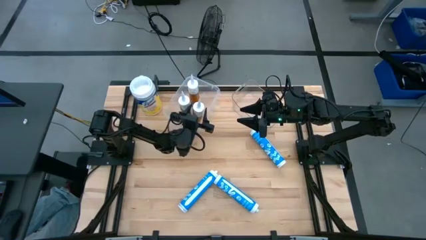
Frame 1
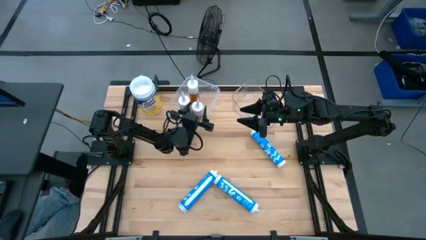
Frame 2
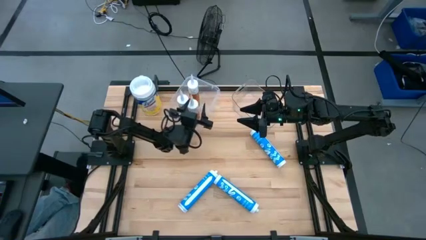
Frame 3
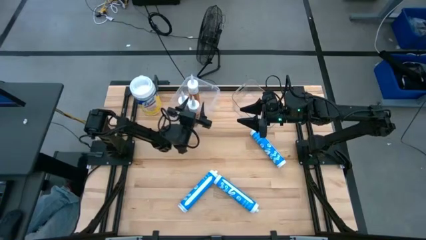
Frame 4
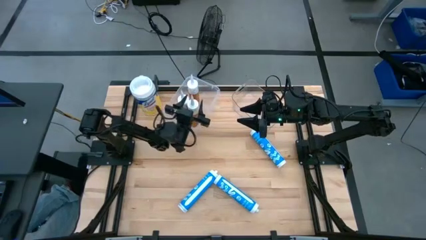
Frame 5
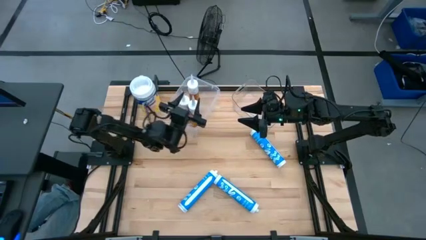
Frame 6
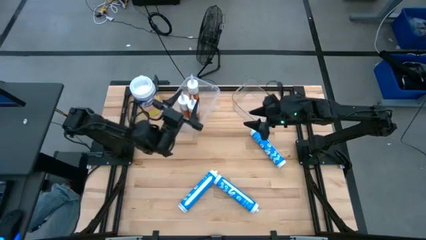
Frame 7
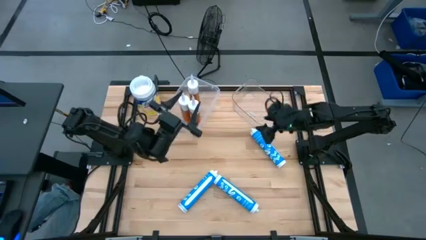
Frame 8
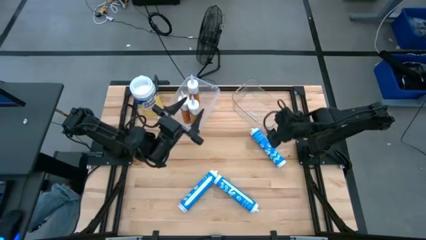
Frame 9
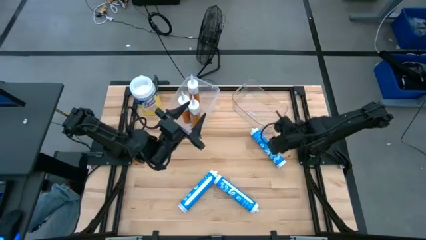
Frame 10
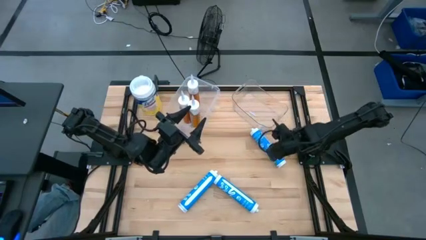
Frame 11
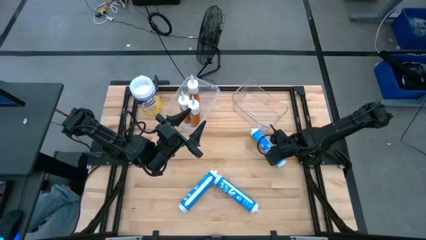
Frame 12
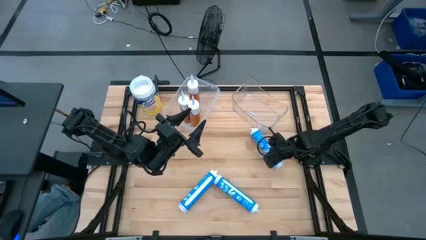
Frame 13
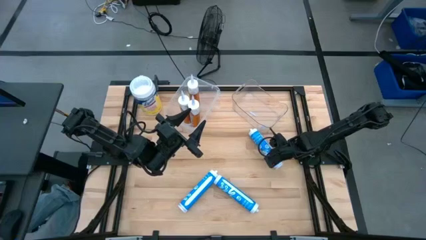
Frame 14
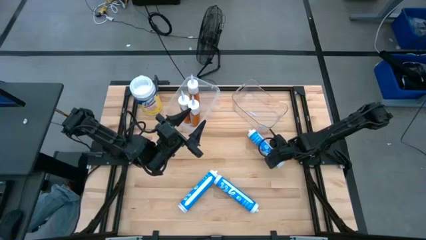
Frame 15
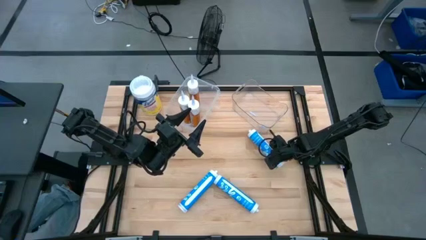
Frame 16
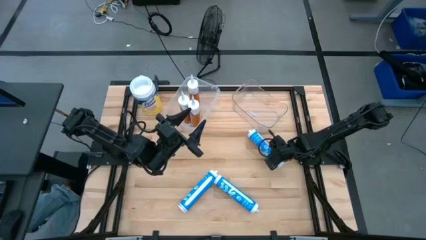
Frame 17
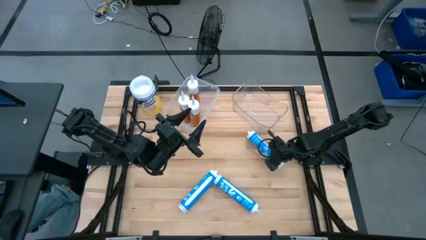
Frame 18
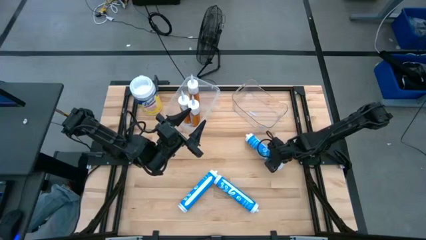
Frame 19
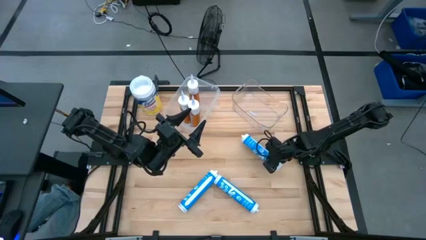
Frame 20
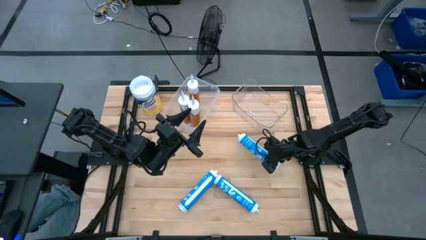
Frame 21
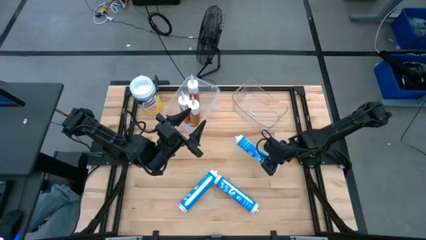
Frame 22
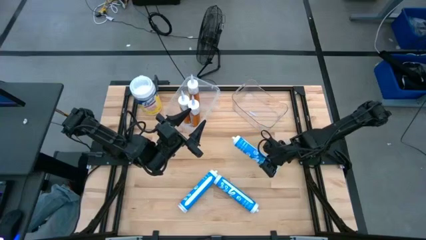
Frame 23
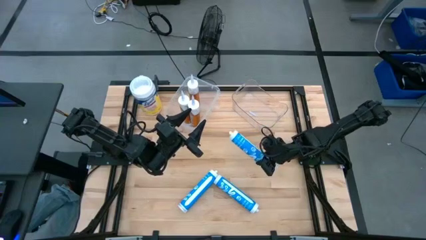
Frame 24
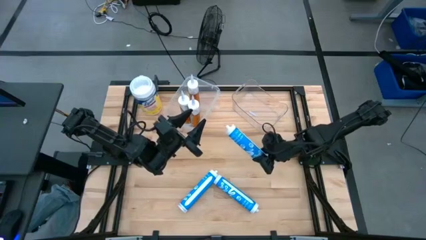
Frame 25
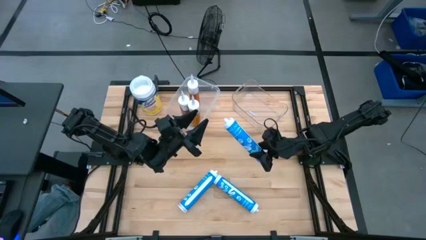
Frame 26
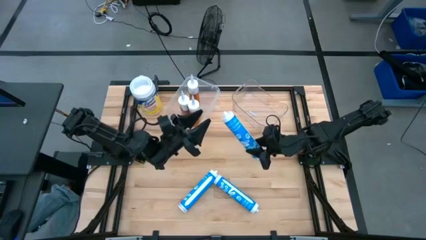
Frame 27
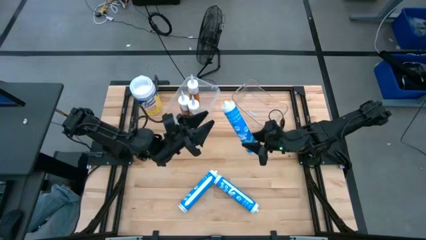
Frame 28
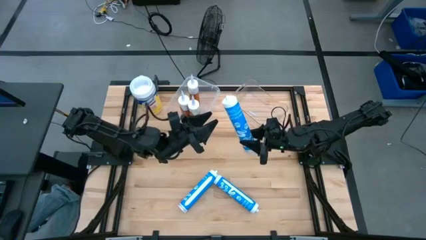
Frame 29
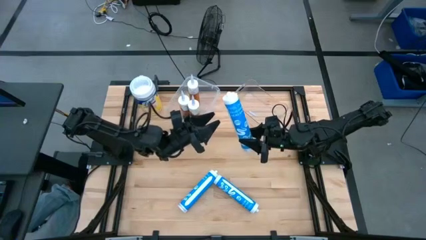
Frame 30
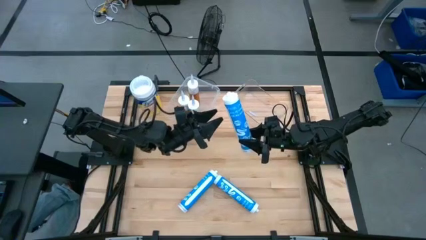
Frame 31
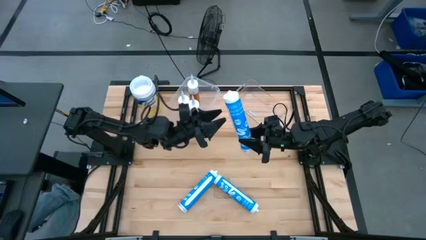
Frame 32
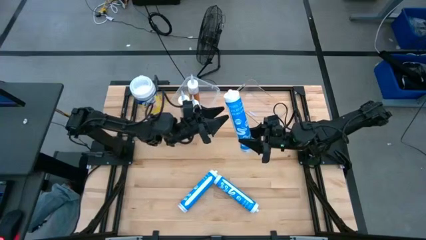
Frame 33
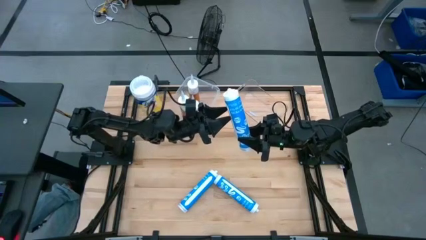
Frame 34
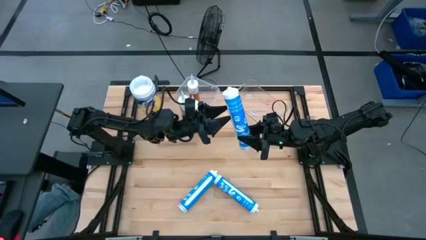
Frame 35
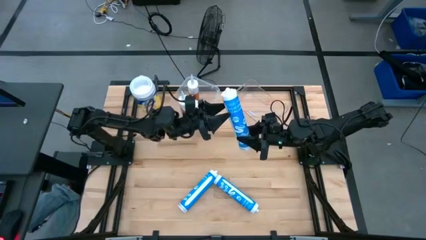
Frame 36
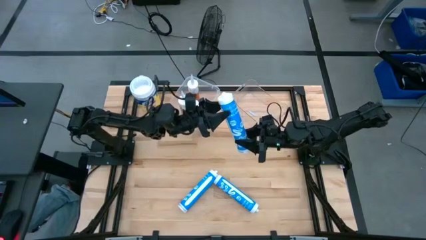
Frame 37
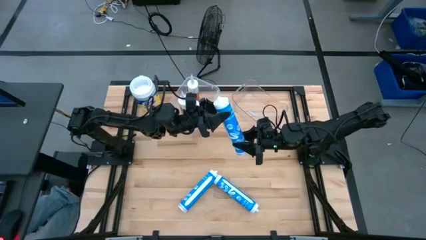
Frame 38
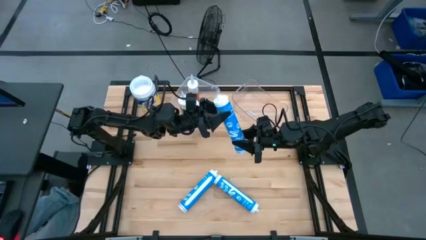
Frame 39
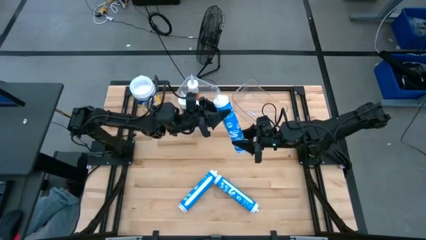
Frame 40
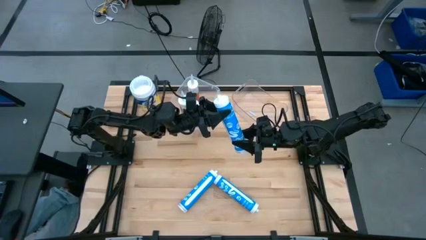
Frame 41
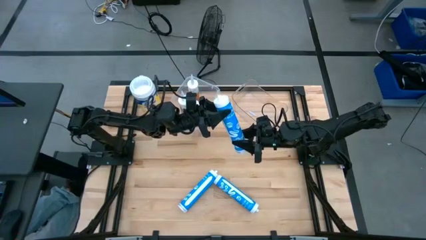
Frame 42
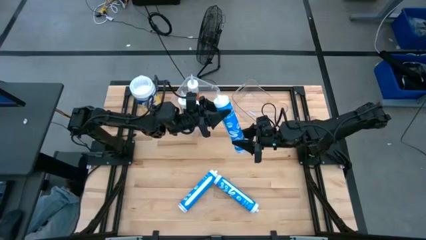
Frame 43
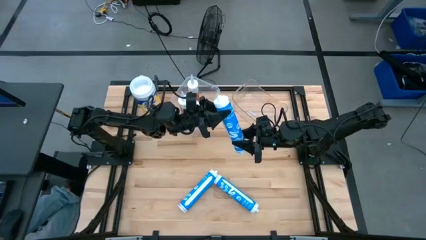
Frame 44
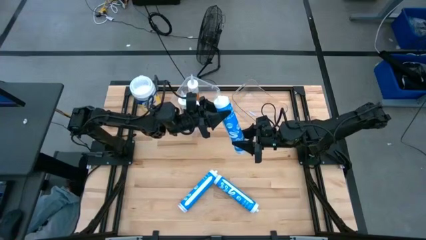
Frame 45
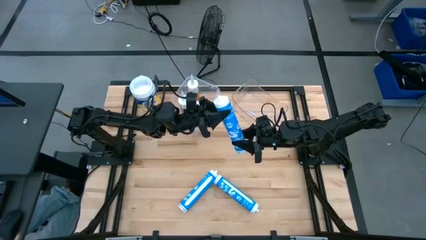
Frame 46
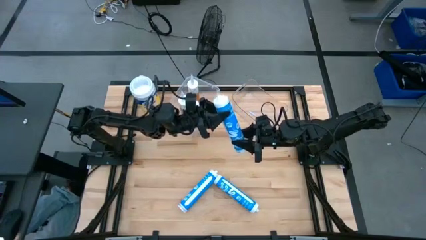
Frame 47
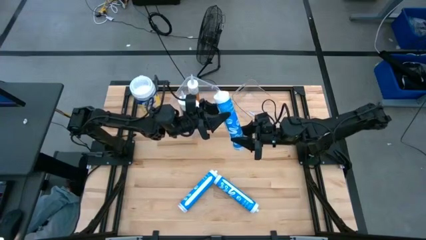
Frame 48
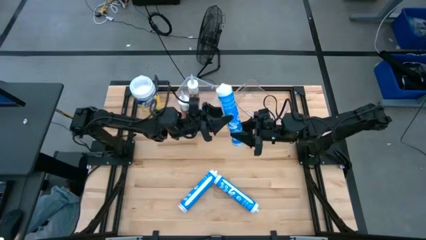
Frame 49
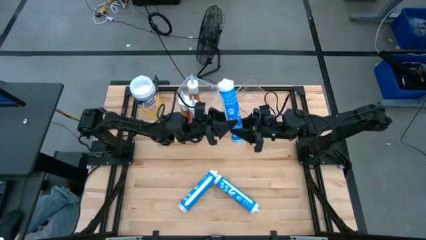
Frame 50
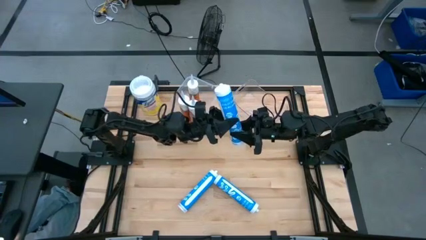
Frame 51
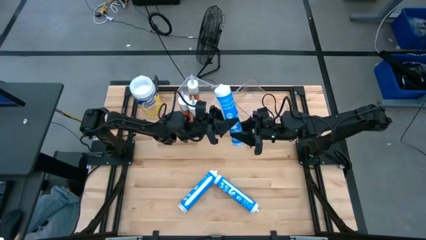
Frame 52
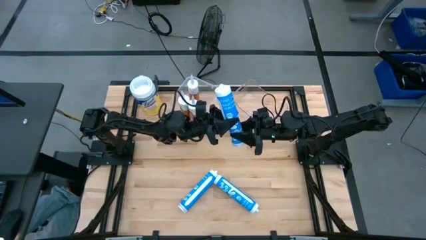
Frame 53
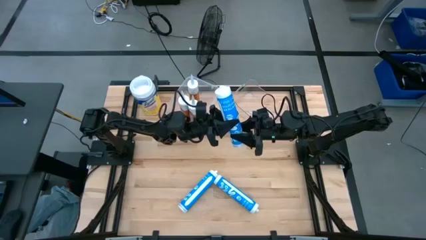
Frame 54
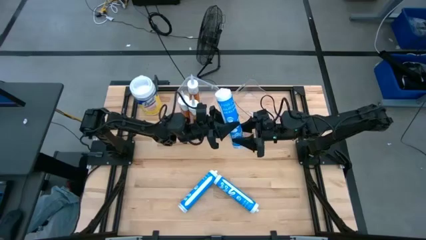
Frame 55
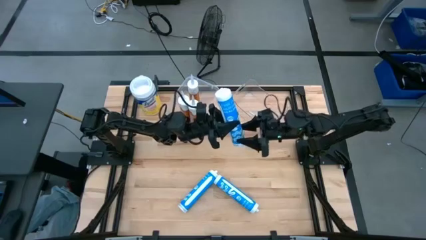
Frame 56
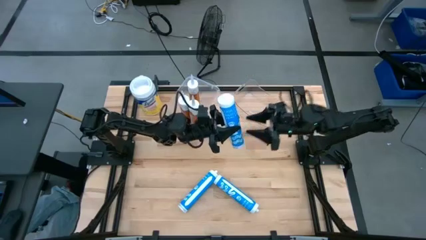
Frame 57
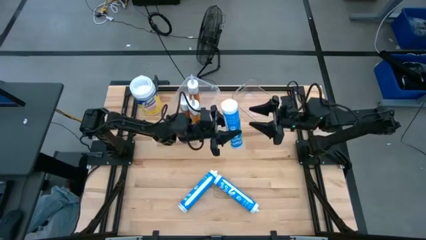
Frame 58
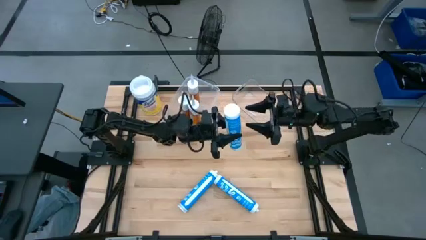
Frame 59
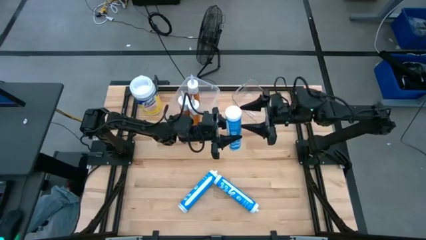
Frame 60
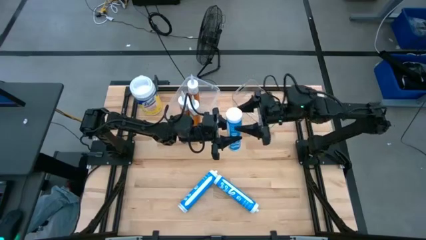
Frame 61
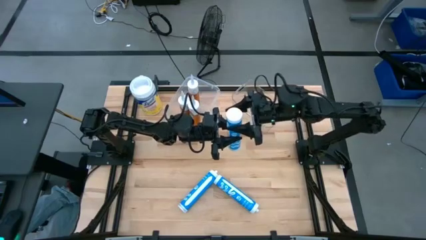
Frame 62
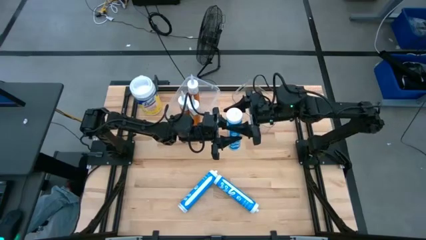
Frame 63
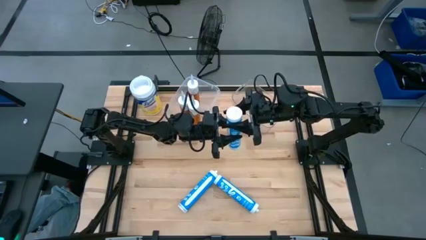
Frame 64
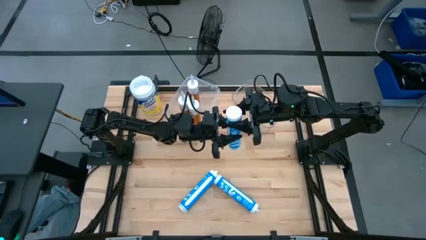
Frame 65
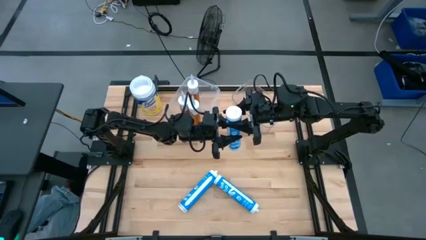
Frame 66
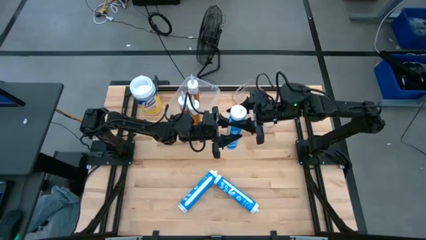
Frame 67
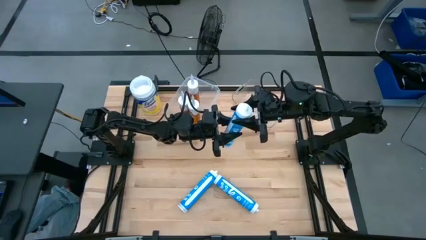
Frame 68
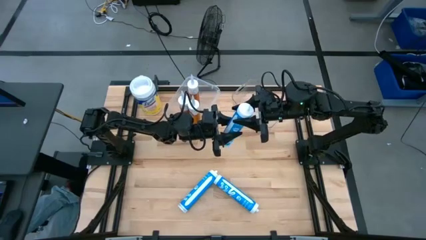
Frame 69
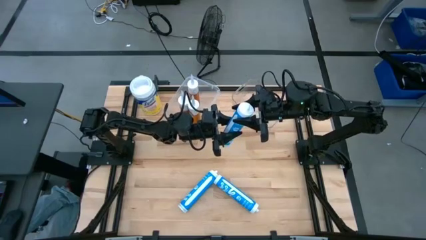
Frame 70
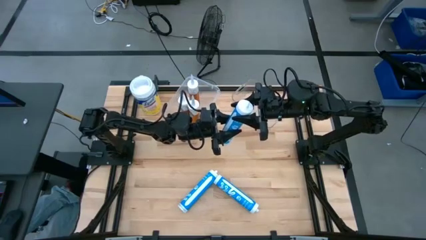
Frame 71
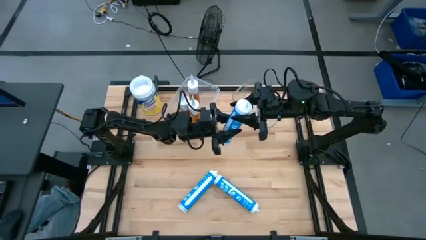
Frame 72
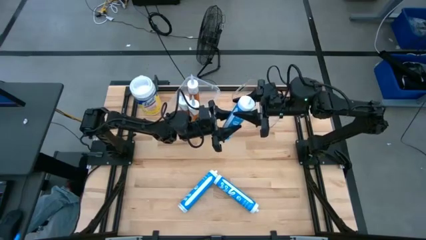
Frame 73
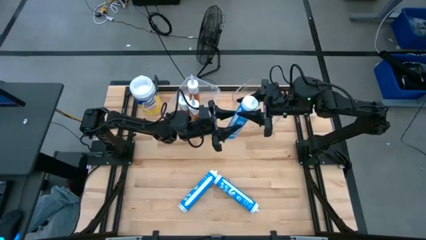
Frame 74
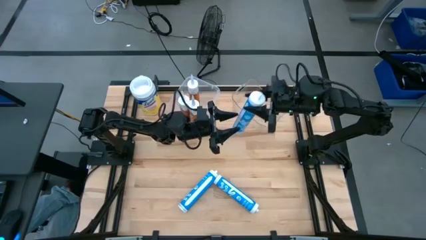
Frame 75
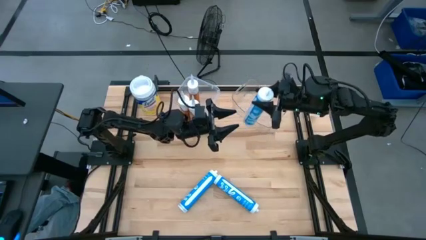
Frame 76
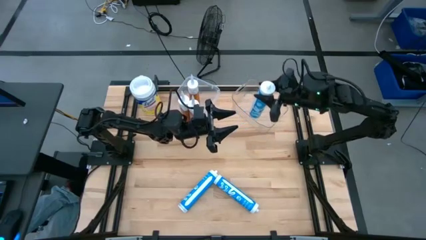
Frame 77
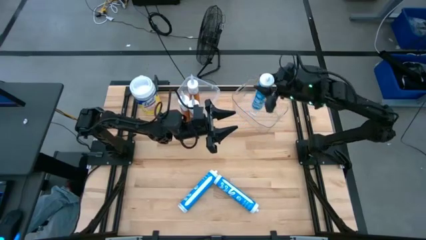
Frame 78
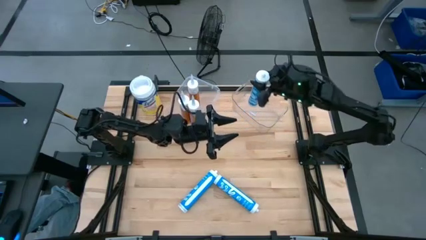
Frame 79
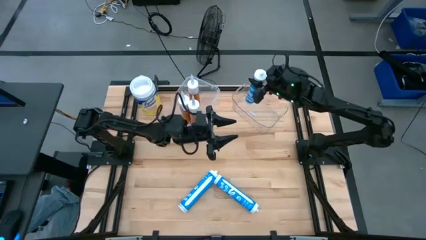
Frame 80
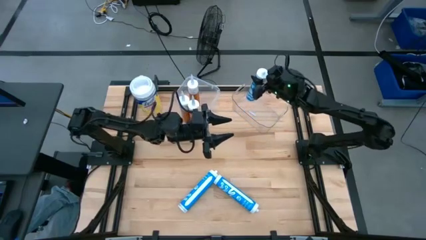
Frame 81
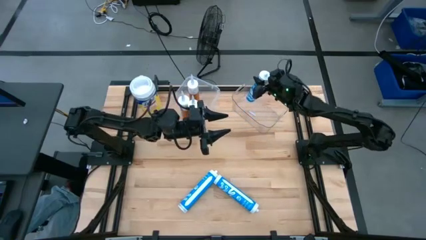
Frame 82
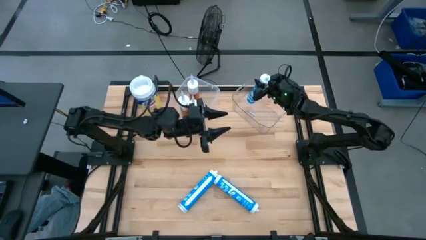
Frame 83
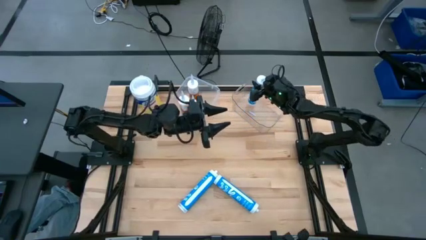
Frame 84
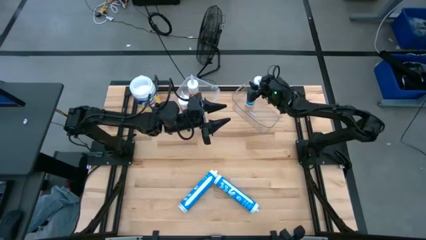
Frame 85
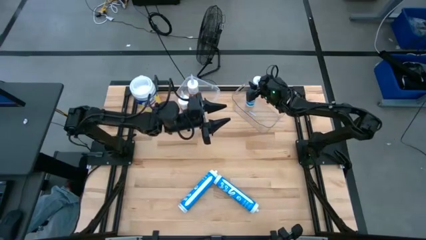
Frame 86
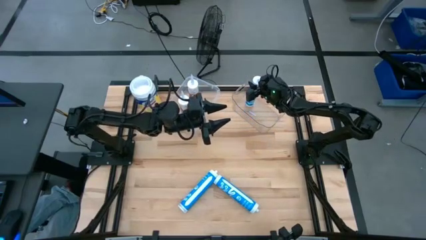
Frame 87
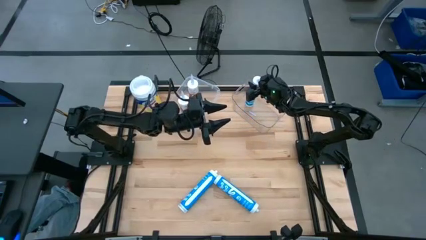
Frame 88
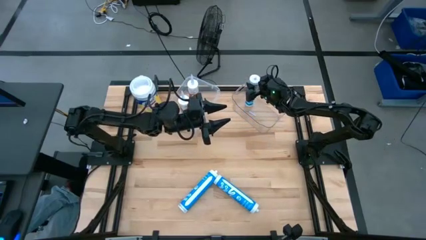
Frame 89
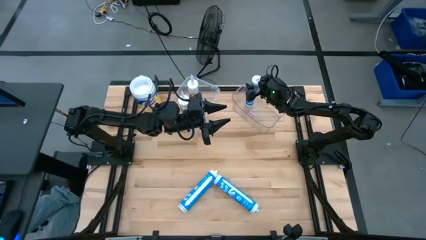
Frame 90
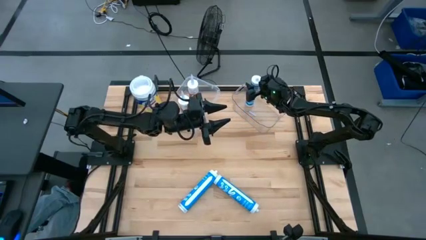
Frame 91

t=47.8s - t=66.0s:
Task: Pick & place silicon tubes, Sealant and Lysol wipes
Put the top blue sealant into the right transparent bin
